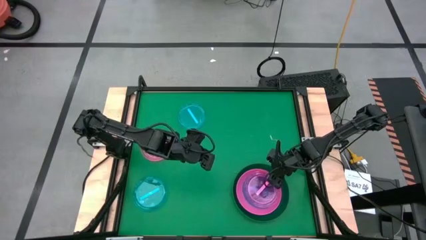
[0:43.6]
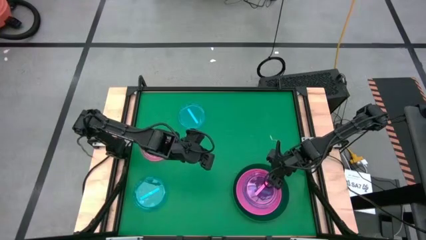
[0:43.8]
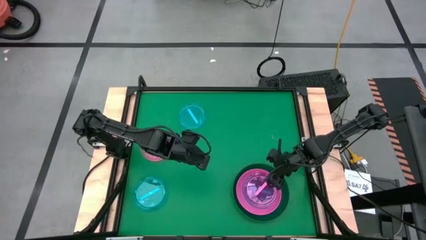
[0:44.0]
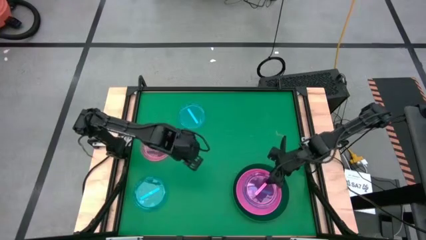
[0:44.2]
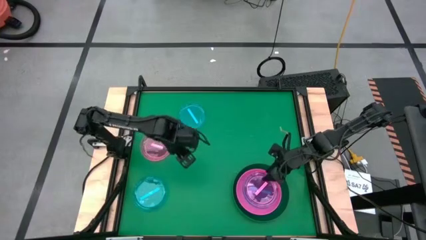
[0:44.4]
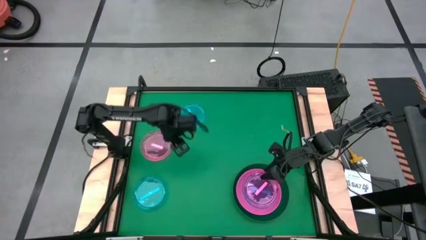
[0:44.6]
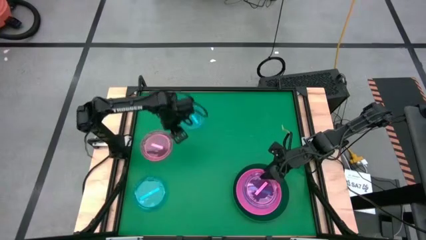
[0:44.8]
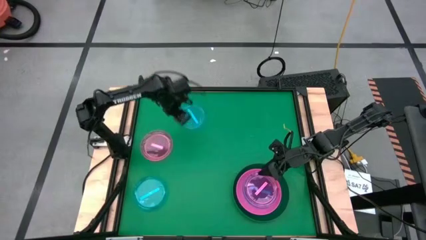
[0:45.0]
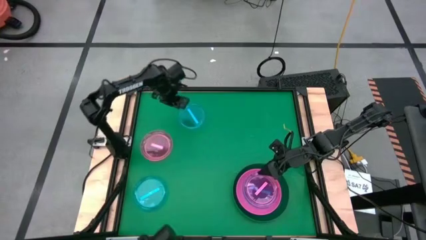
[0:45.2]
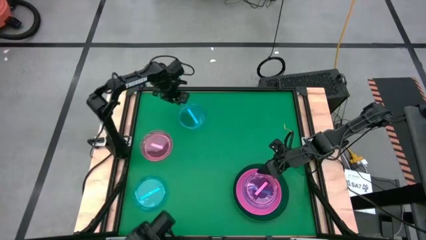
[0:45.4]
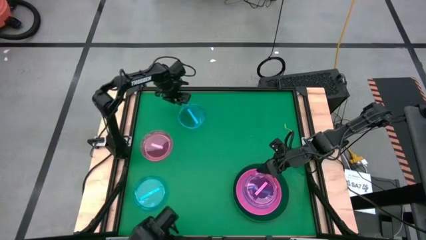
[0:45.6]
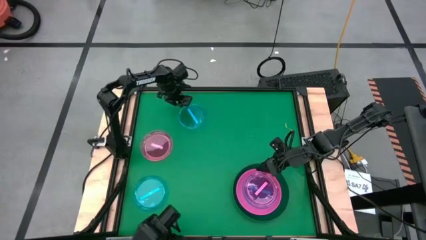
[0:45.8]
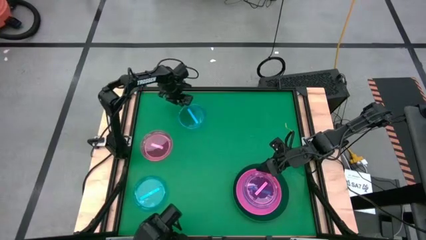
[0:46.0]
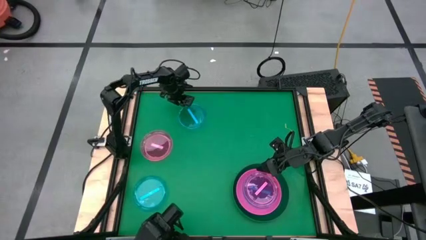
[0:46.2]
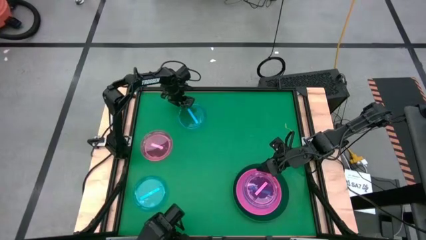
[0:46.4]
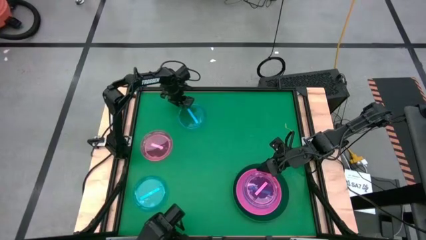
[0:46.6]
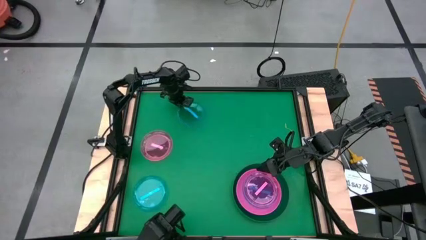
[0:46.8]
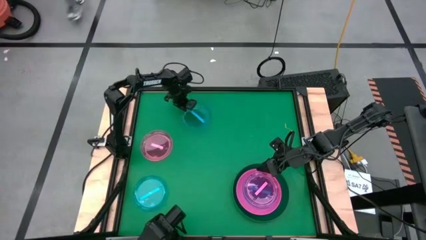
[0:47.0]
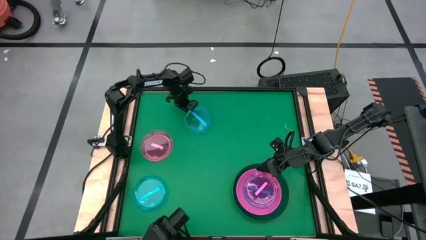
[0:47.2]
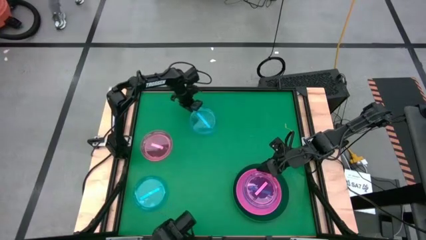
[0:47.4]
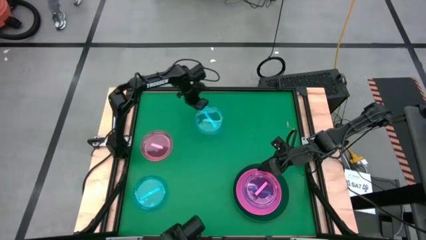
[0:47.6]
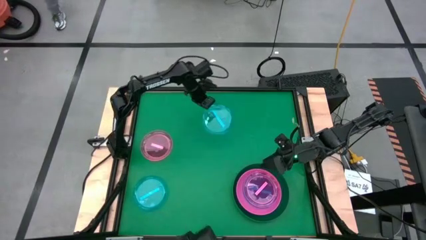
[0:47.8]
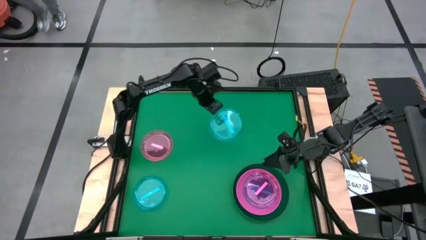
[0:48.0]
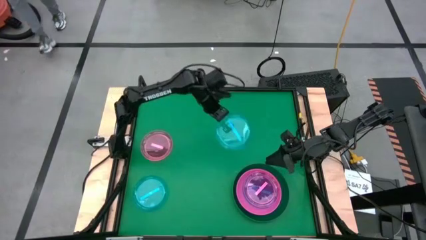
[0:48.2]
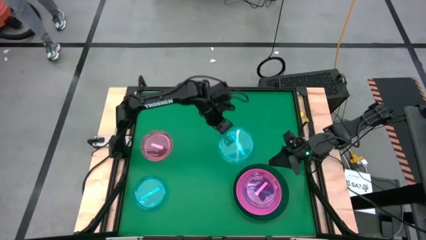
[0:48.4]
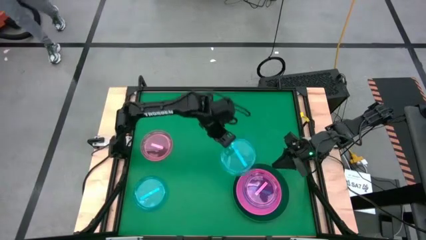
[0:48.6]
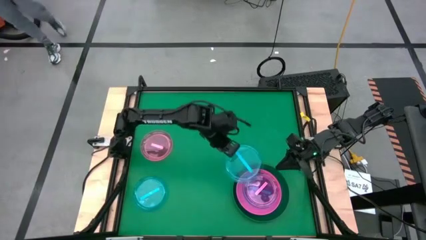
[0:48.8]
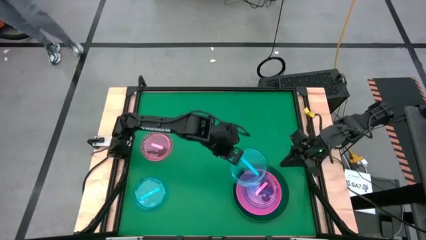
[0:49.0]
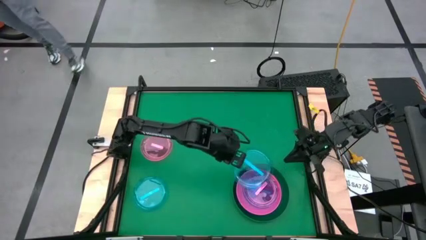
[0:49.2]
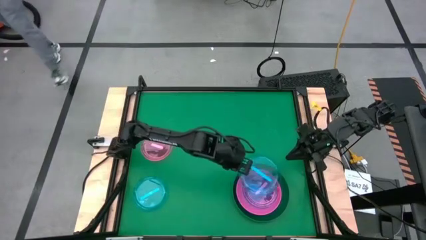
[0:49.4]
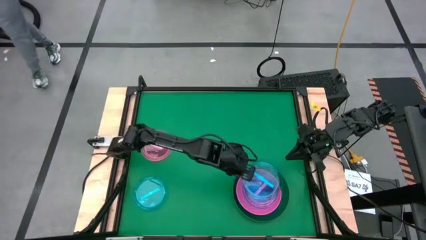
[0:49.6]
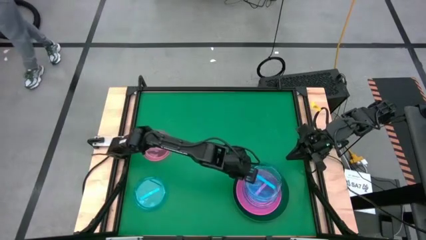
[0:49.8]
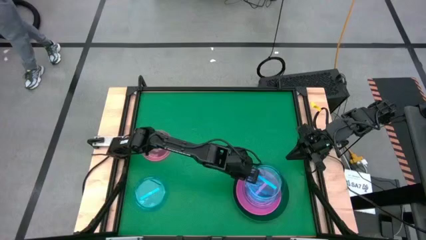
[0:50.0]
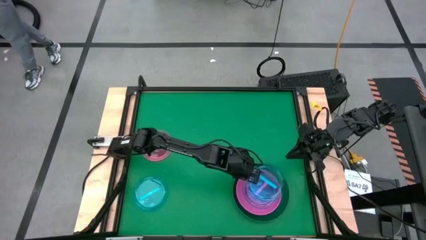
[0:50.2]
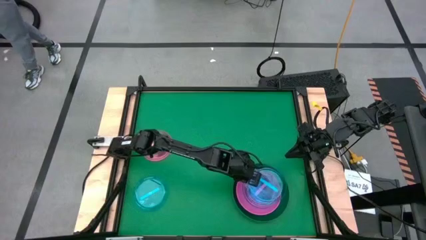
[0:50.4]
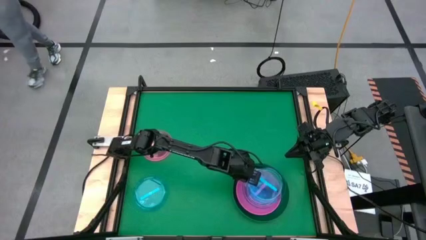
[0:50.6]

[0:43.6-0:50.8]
Task: Stack plastic plates
Stack the top blue plate on top of pink plate

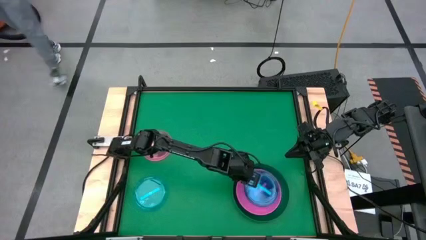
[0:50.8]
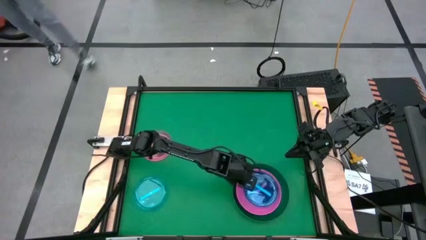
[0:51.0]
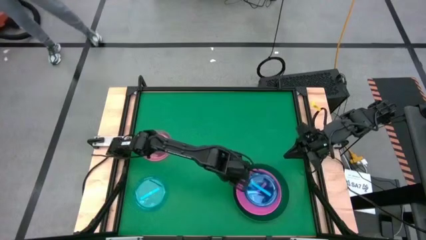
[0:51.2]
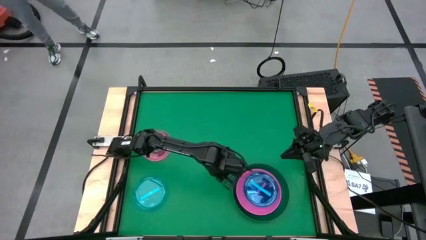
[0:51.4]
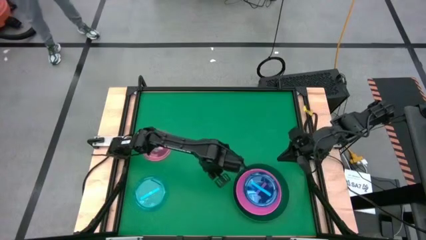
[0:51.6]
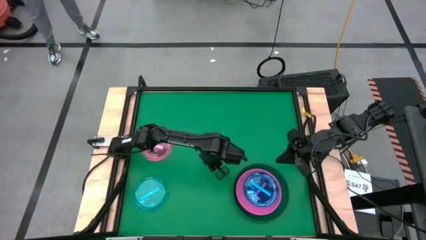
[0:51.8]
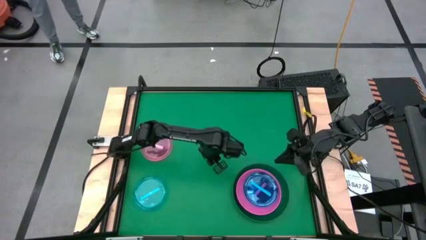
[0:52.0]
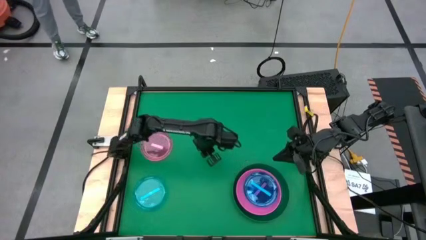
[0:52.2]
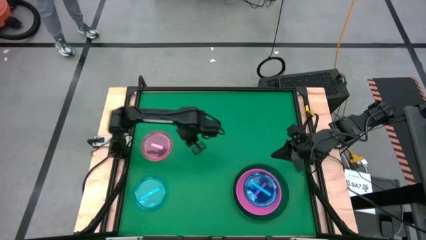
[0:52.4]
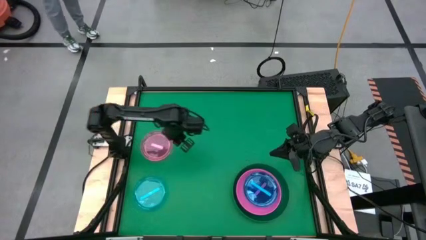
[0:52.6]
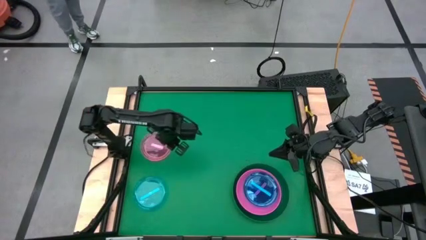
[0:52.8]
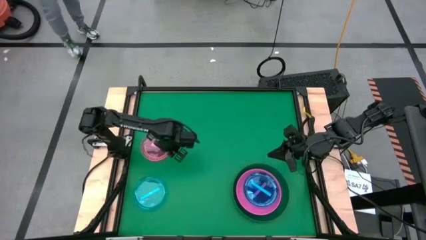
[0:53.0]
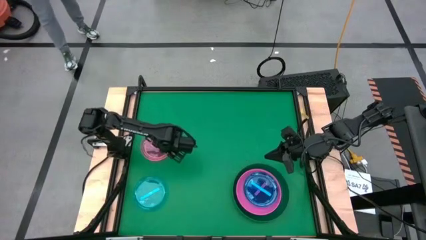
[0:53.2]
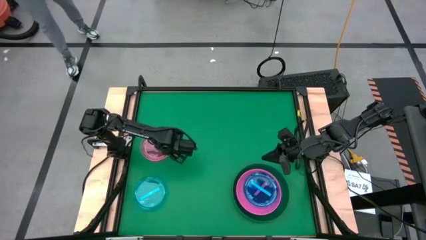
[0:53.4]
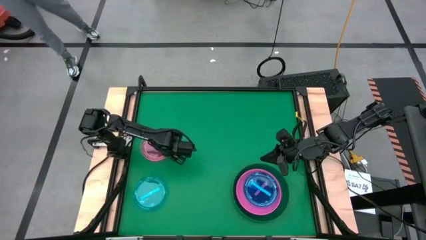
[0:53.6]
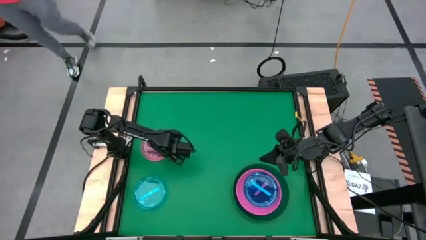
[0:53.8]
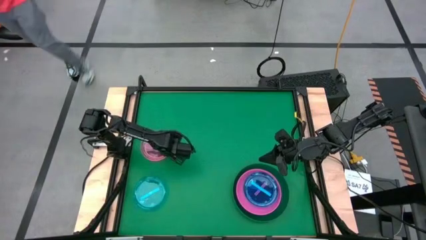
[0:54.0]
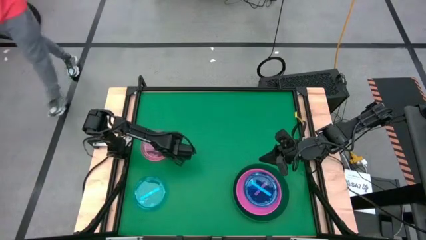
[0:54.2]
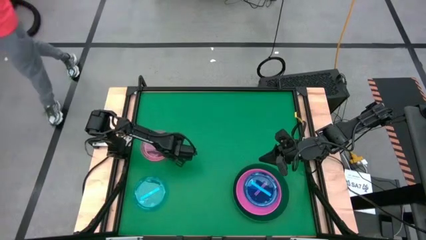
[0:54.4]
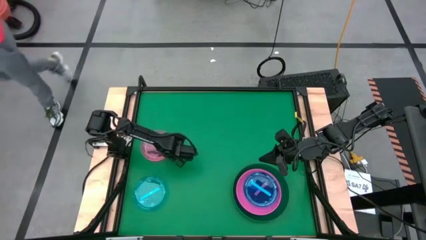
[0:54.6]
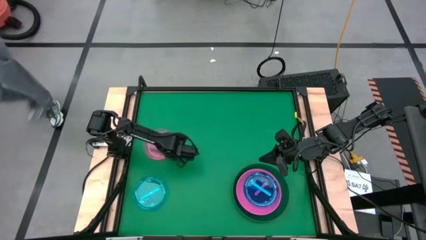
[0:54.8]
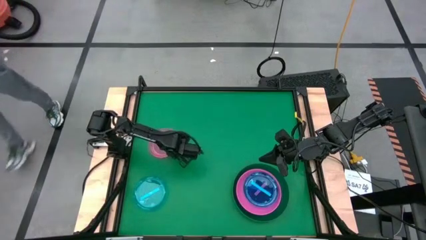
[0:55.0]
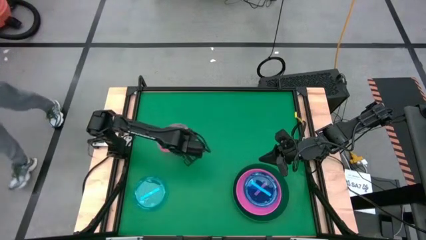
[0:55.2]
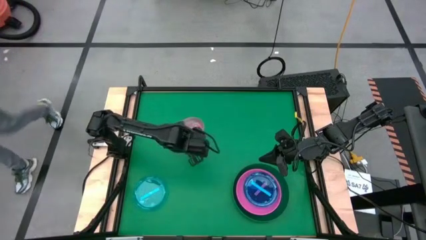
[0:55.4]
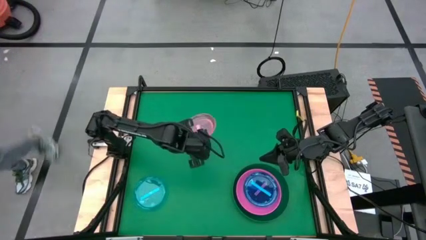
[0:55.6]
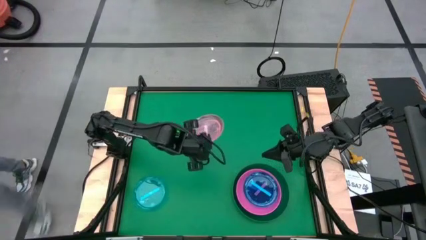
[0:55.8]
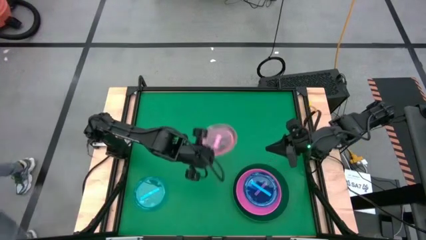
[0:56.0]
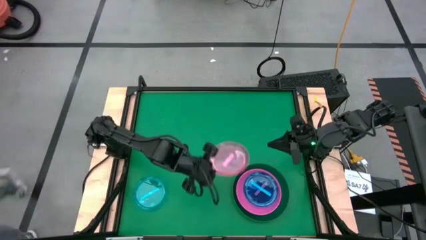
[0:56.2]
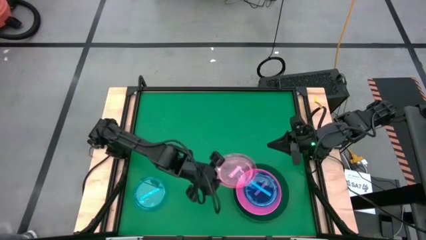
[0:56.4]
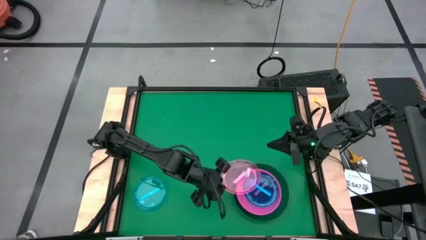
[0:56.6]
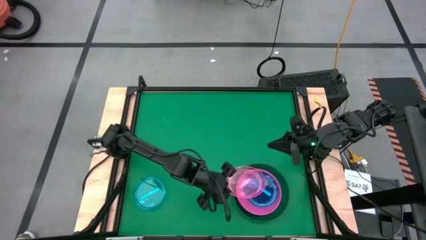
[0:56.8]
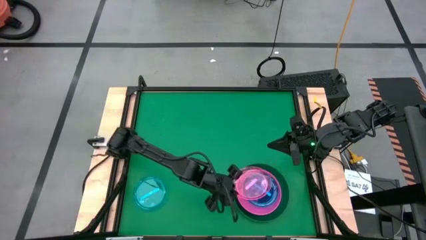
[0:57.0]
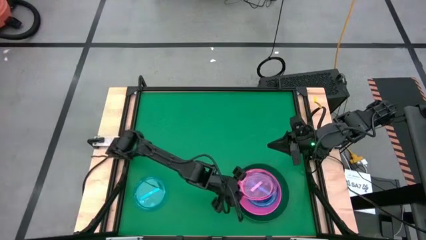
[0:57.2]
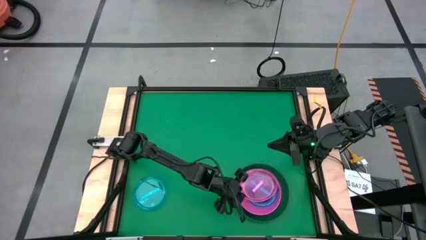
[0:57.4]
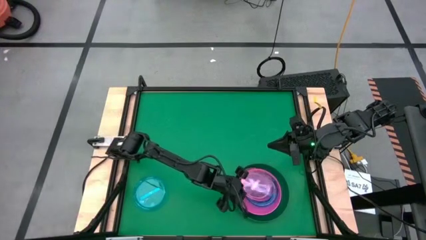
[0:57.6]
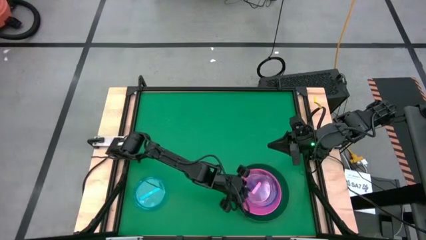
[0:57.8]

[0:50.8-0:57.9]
Stack the pink plate on top of blue plate
